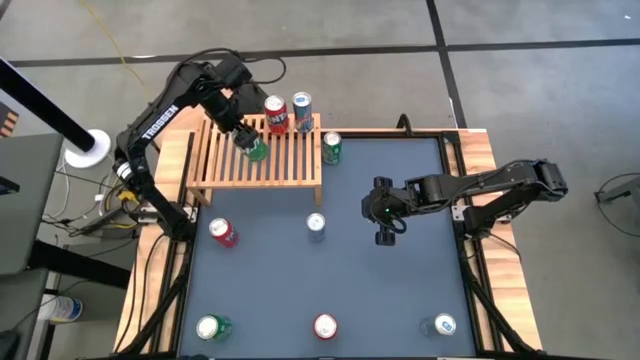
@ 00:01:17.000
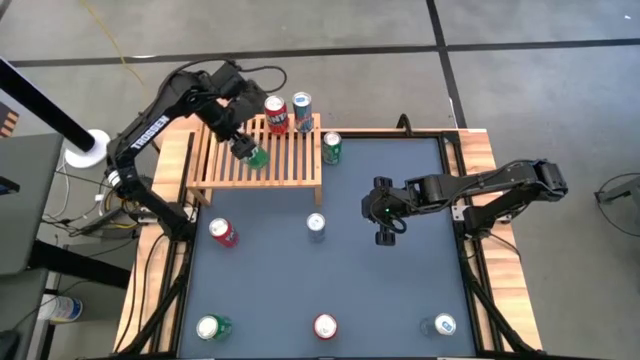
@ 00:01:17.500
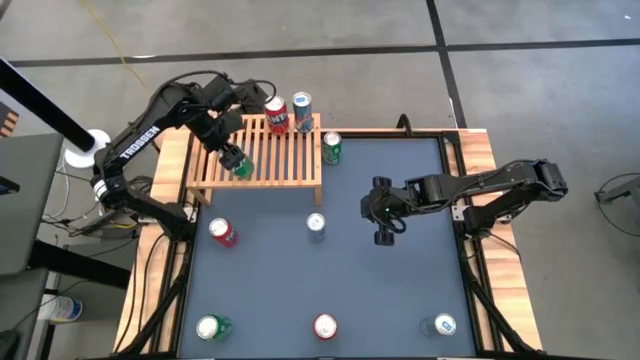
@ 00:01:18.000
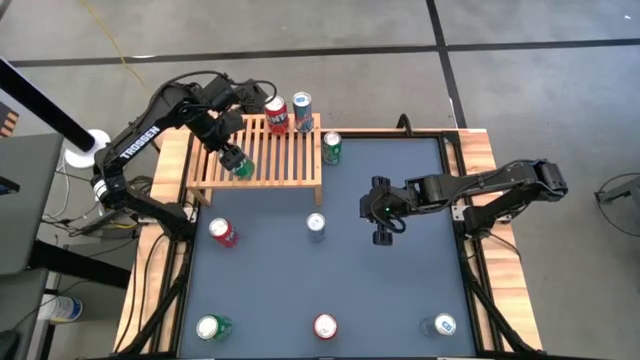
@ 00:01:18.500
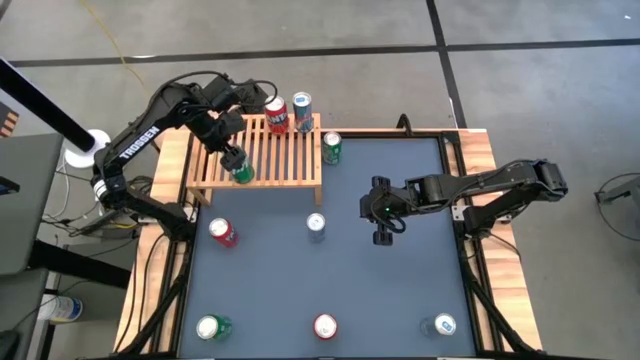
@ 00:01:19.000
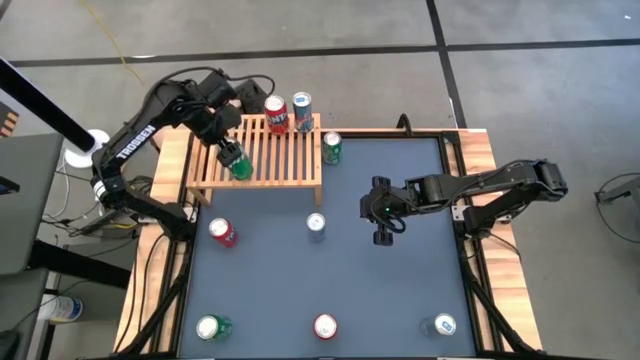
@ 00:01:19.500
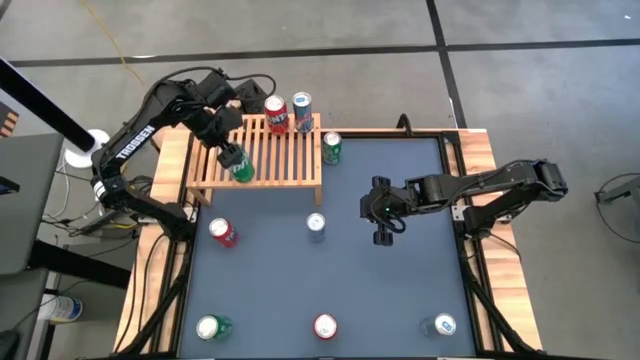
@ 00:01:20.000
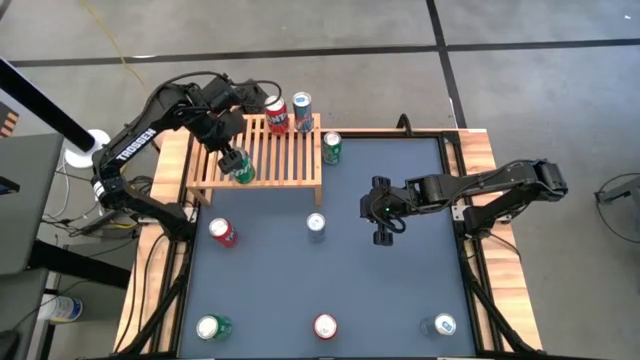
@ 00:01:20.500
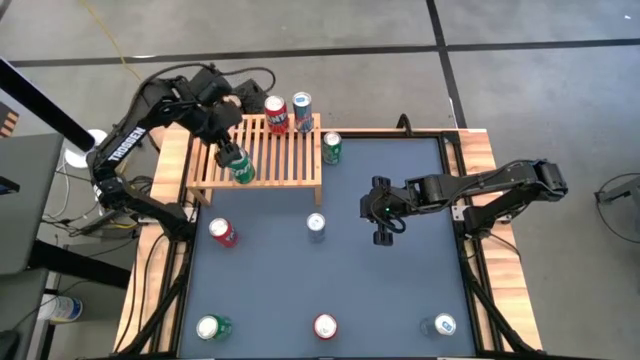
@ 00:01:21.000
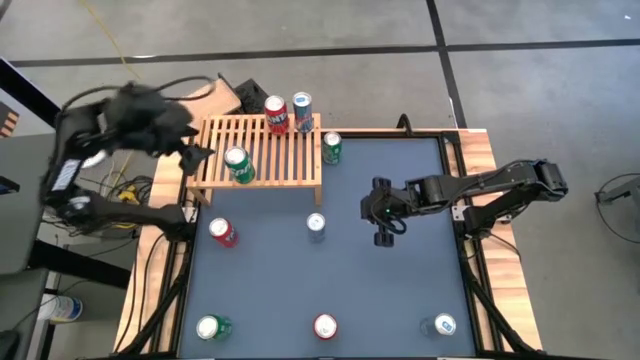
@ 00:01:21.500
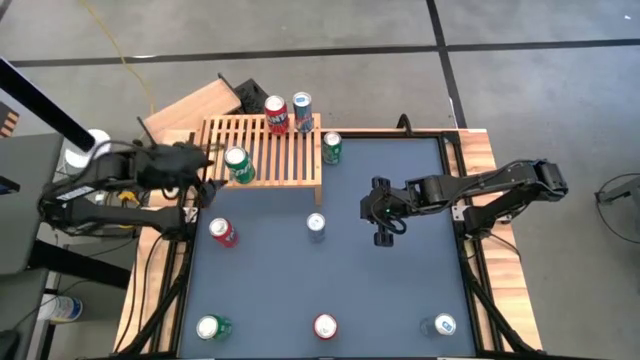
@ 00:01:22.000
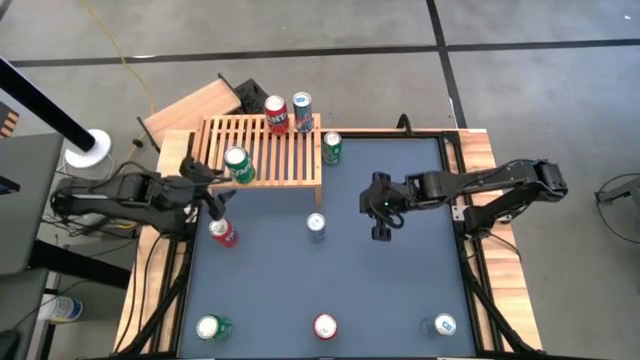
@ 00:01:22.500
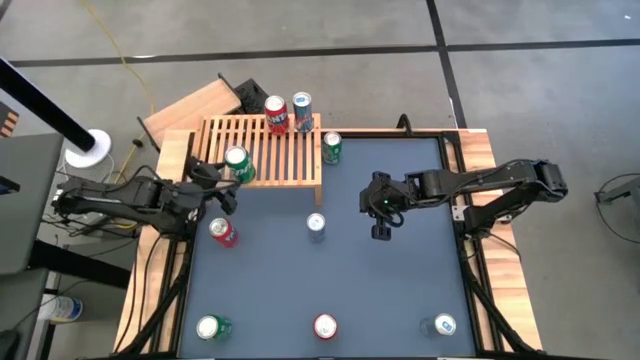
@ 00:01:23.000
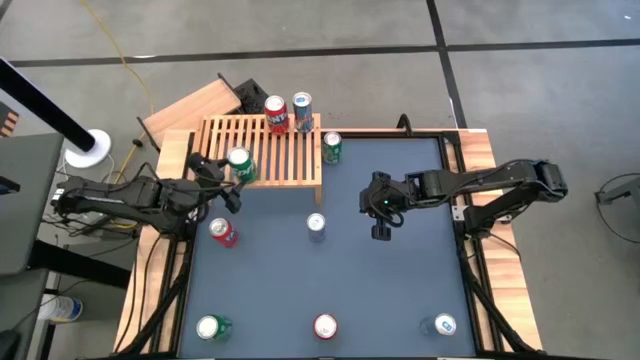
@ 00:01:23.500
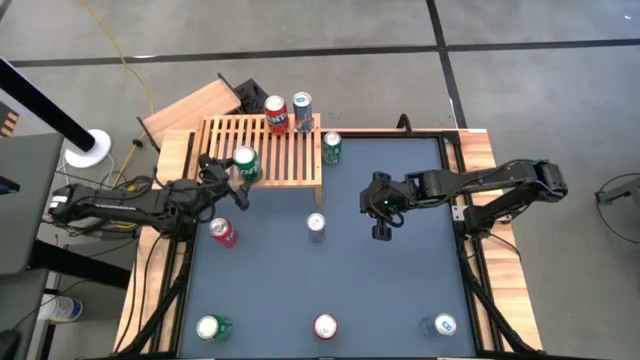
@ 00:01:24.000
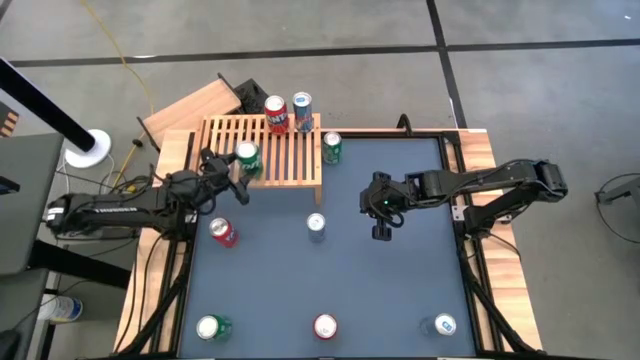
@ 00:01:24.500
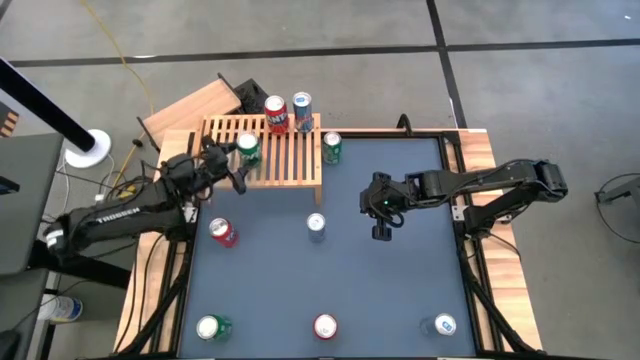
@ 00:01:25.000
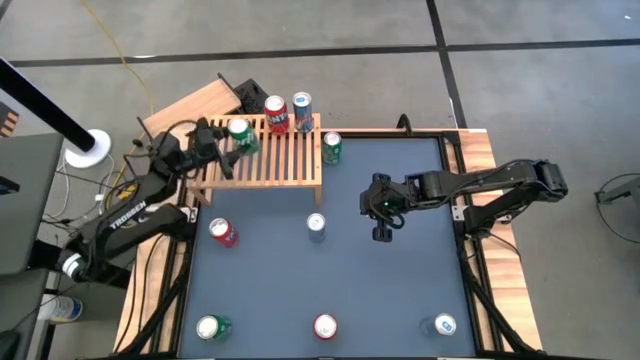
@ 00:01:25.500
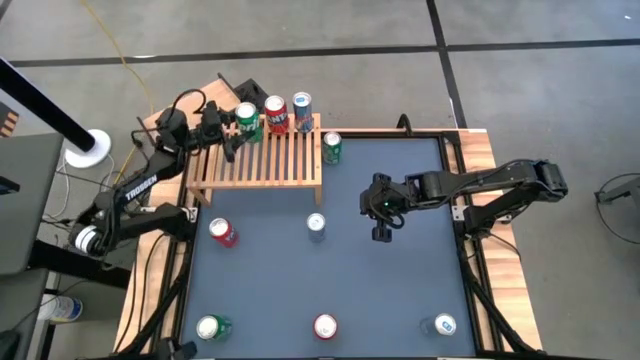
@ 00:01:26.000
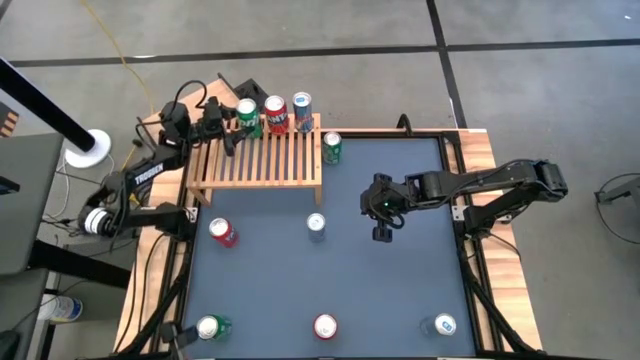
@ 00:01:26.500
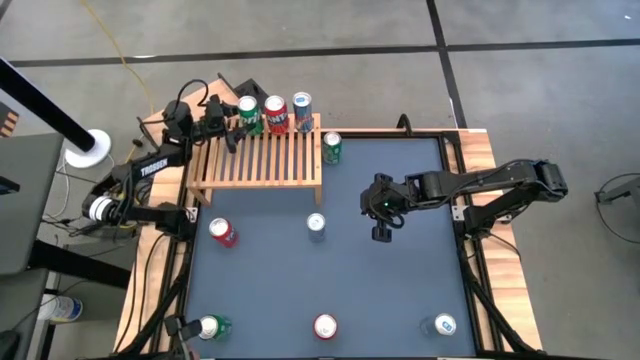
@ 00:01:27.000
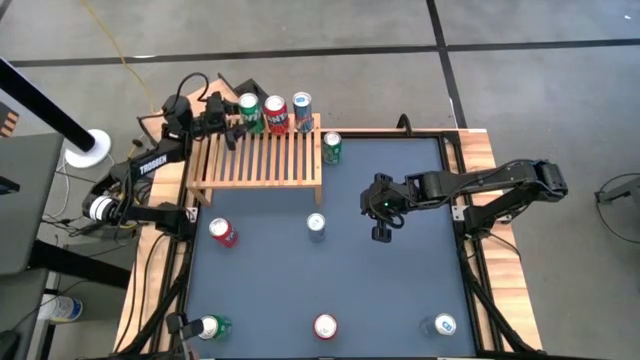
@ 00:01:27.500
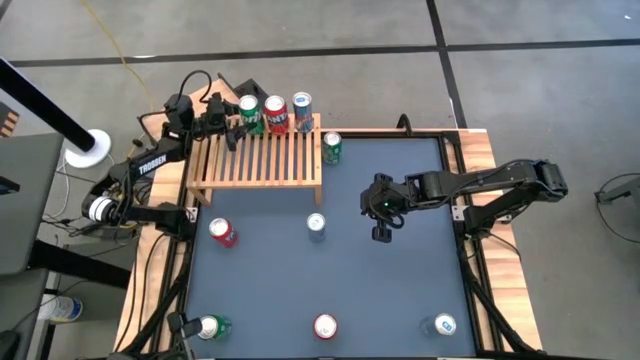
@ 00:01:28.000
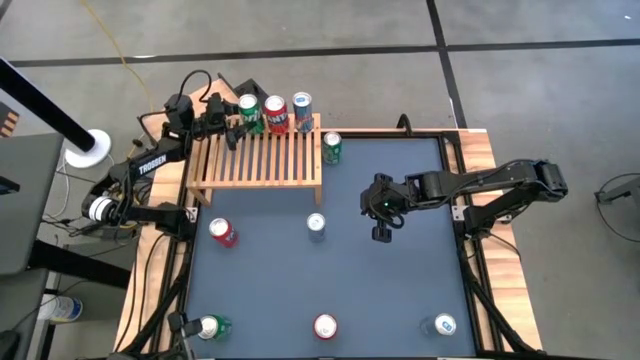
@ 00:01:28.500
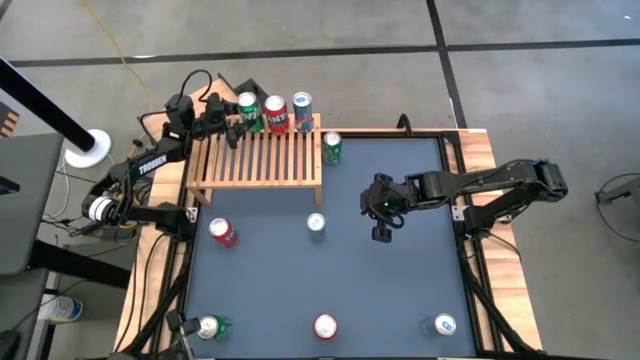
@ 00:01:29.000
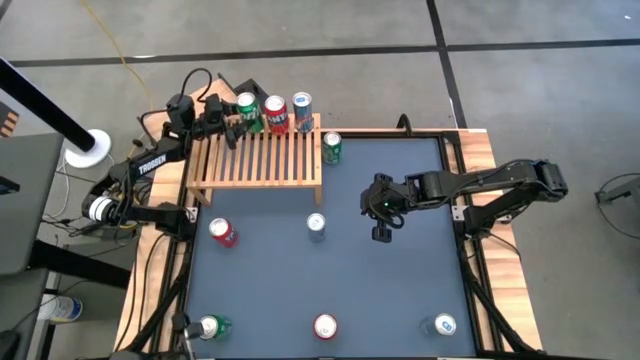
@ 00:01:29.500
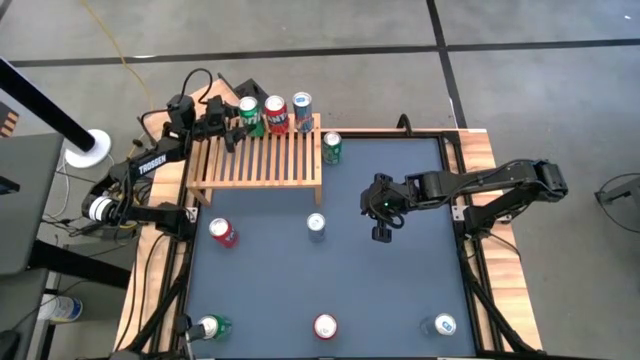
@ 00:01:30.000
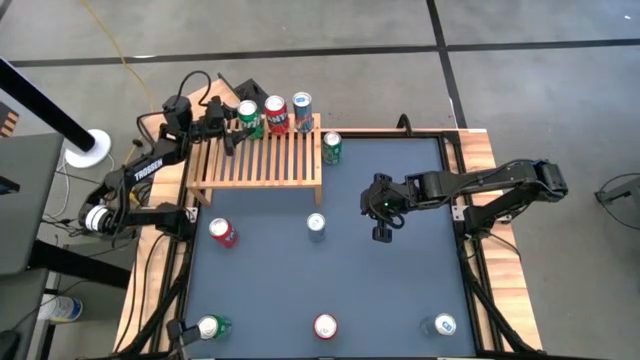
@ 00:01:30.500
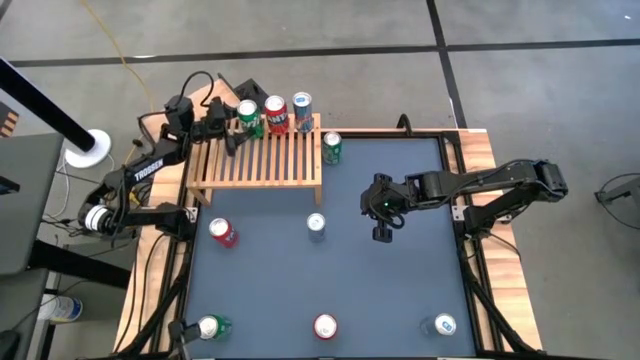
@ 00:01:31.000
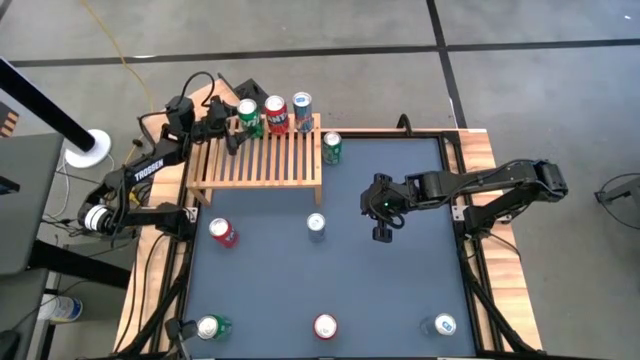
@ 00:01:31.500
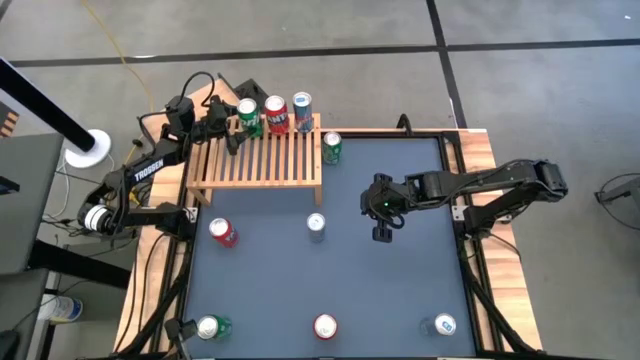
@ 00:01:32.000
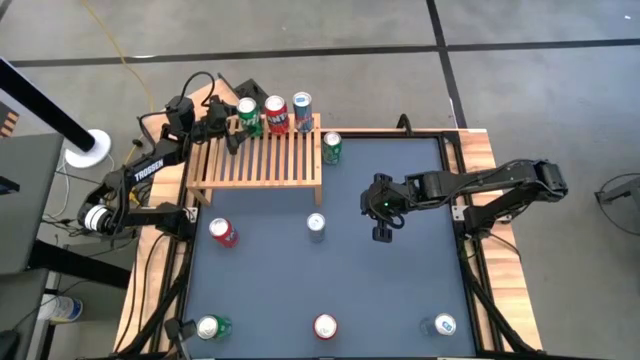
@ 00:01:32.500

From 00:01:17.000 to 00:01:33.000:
Task: Place canned beverage on shelf
Put the middle right green soda can on the shelf
